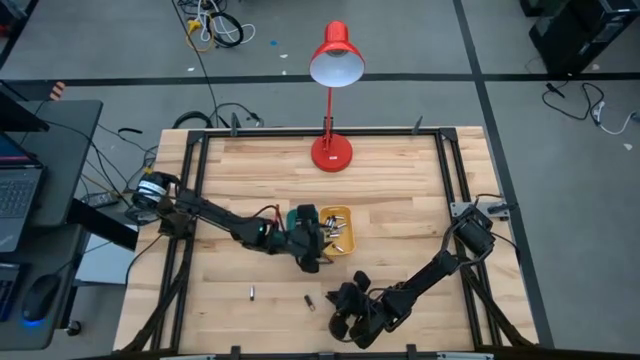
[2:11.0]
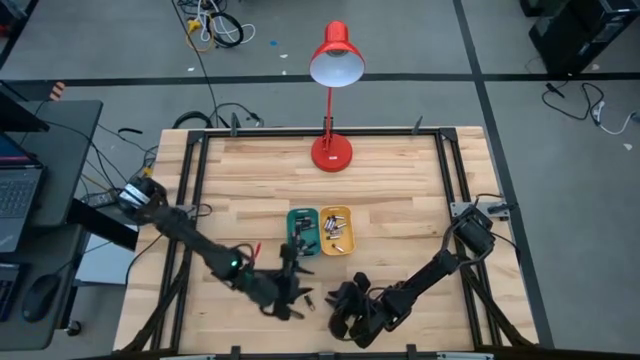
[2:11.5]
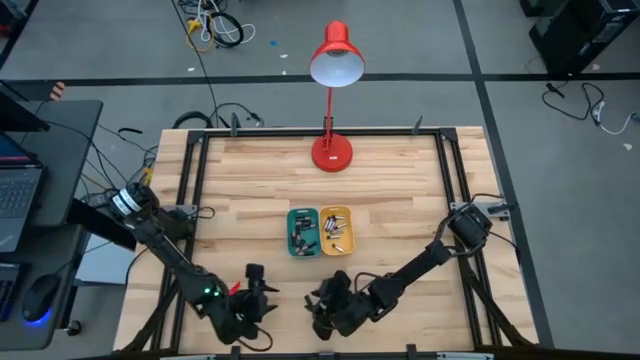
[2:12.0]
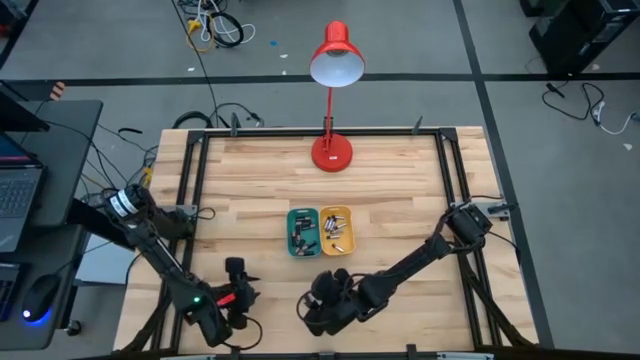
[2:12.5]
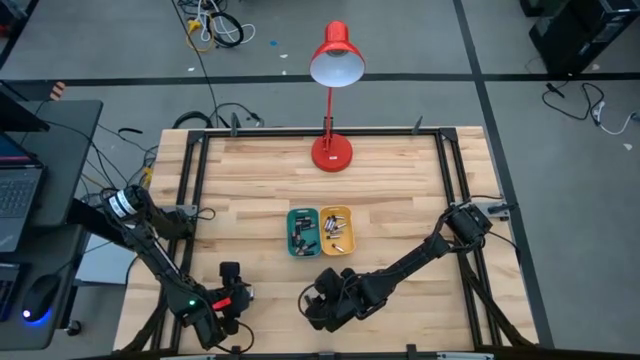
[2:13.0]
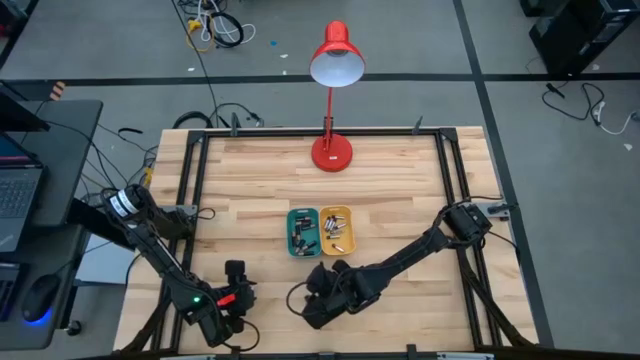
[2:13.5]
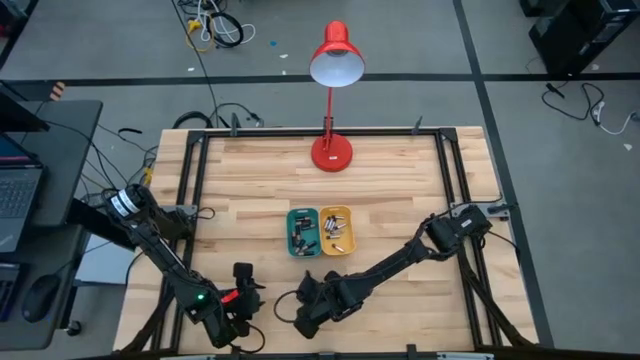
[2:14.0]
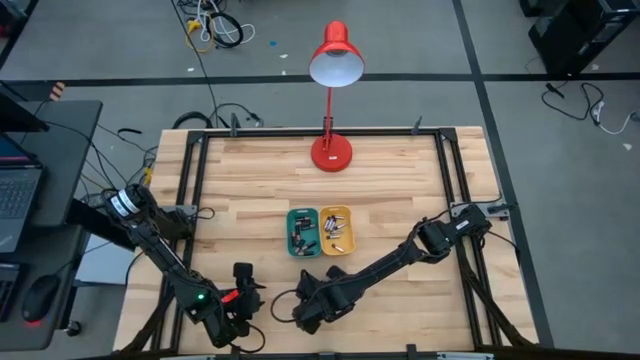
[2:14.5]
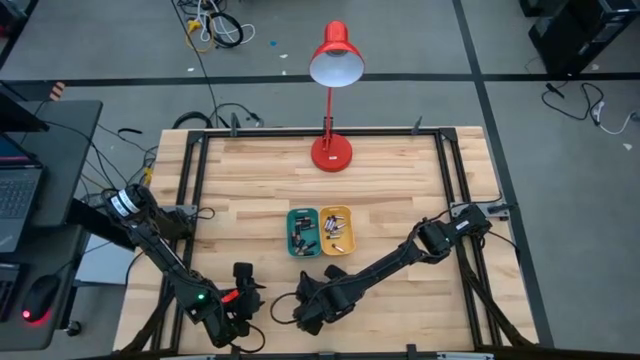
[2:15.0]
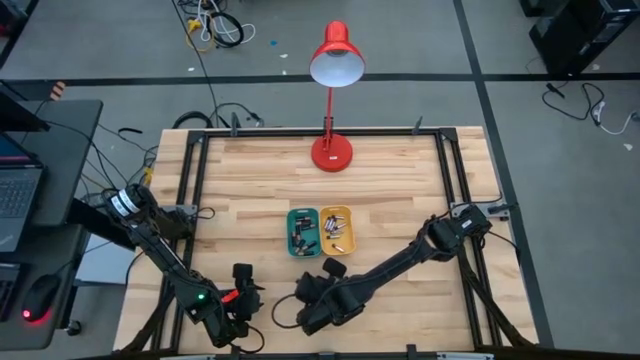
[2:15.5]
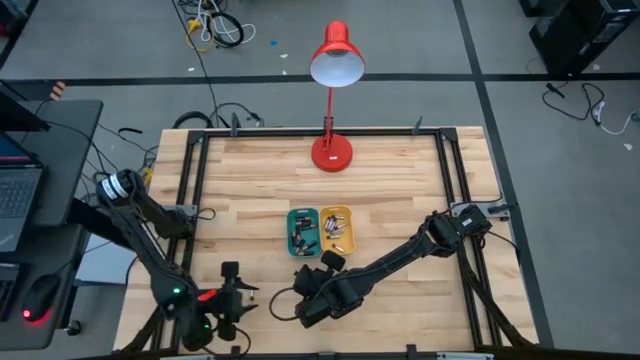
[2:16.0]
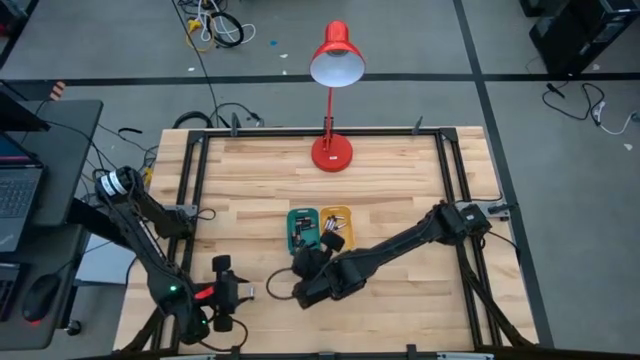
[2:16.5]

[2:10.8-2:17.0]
Task: Sort batteries
Put the black battery into the blue bin

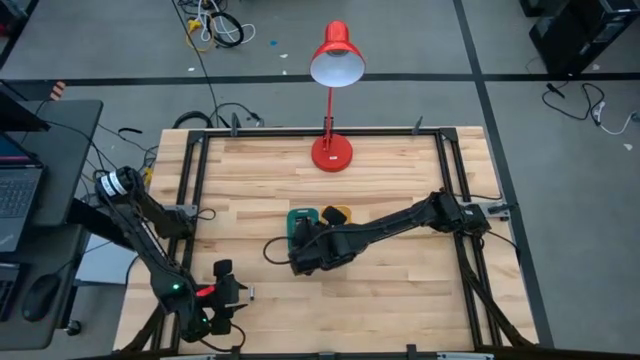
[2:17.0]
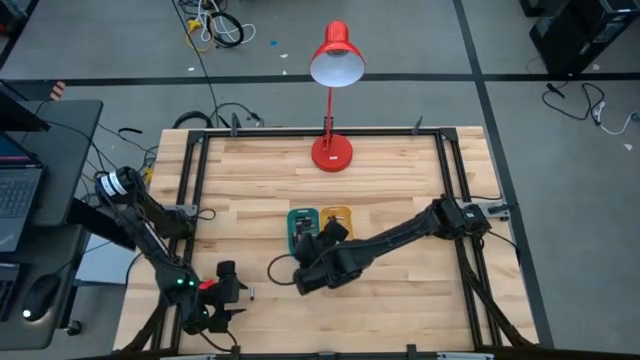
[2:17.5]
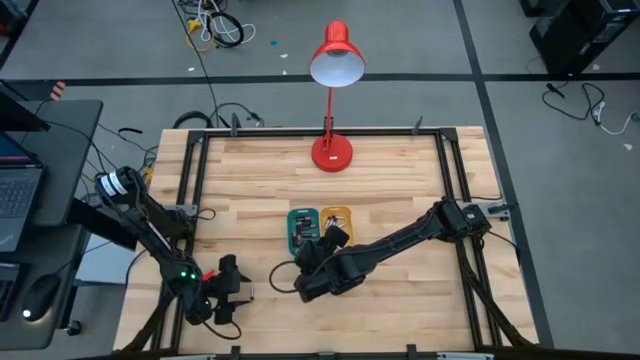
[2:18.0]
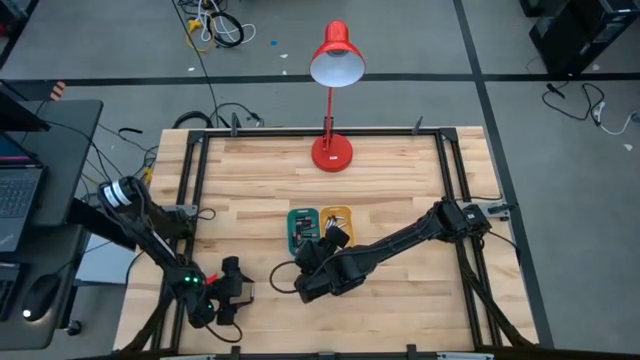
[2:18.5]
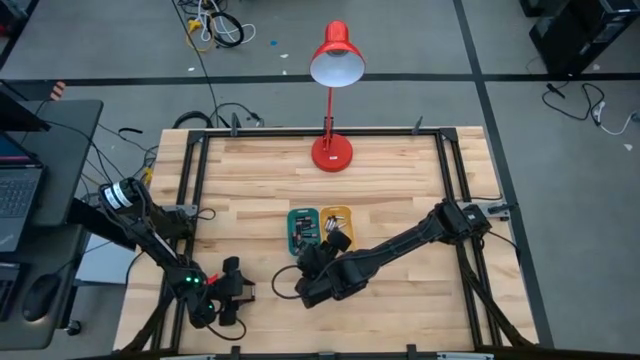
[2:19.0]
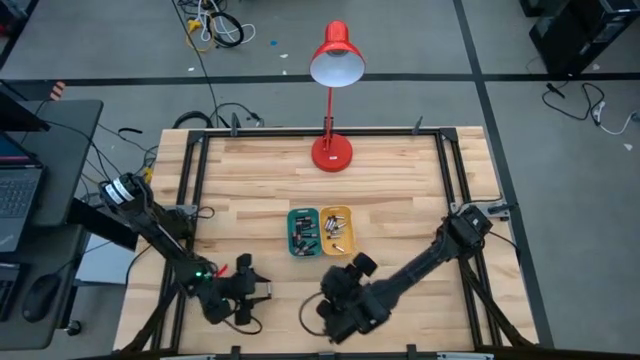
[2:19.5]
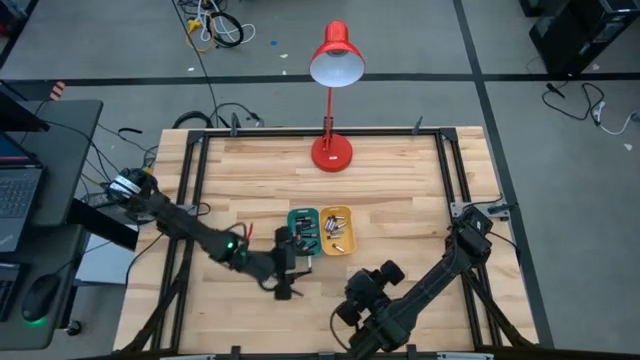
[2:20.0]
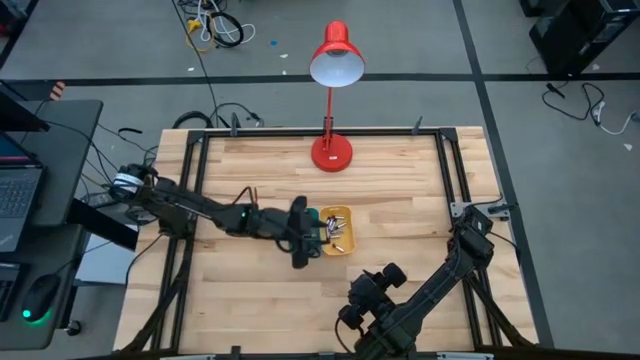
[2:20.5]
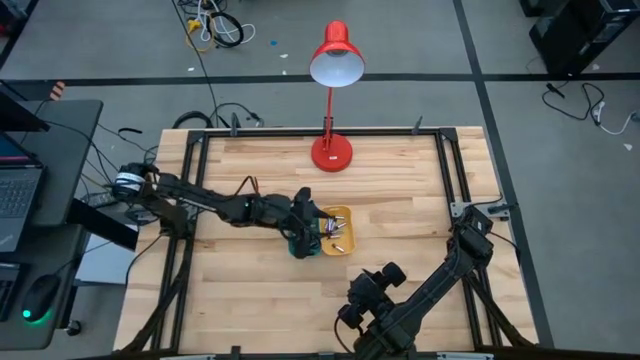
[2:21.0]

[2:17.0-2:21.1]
Put the white battery into the yellow bin

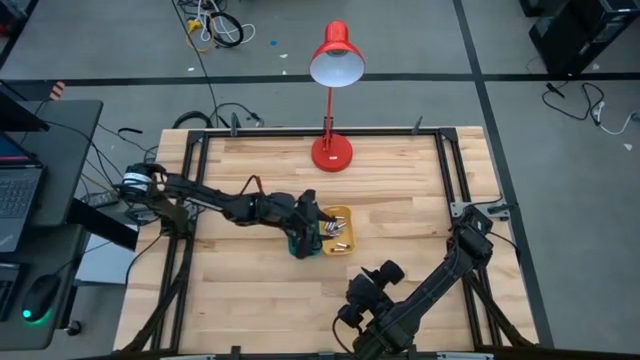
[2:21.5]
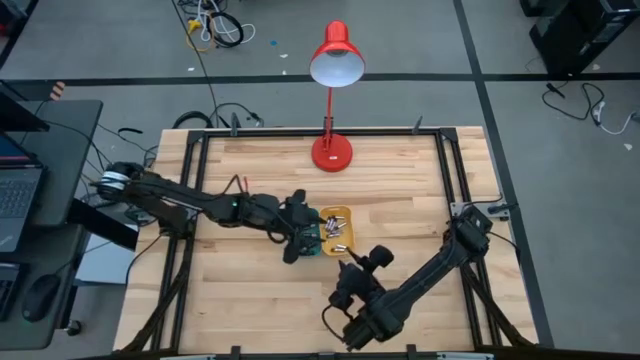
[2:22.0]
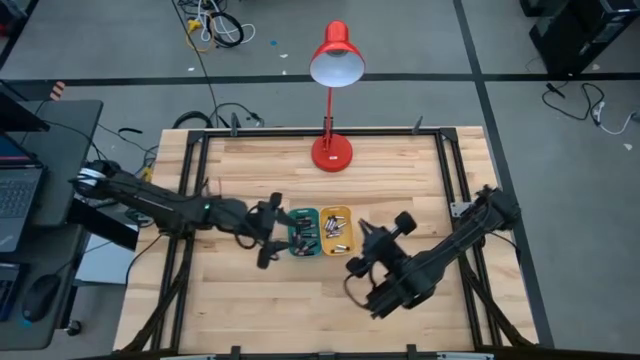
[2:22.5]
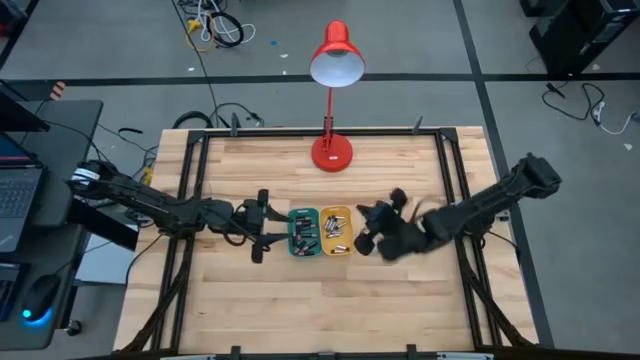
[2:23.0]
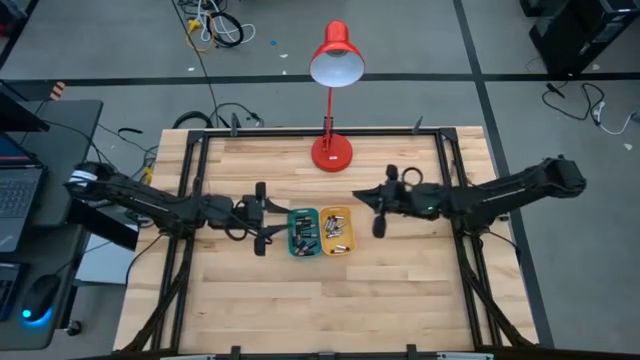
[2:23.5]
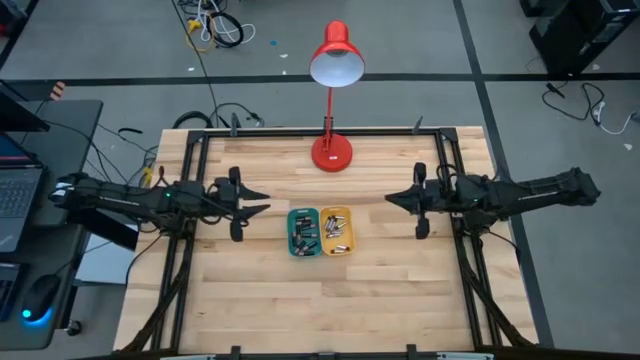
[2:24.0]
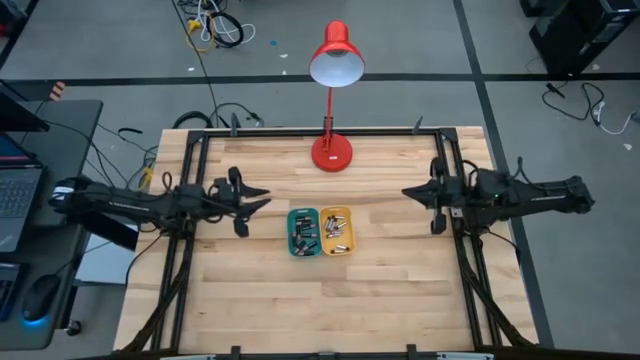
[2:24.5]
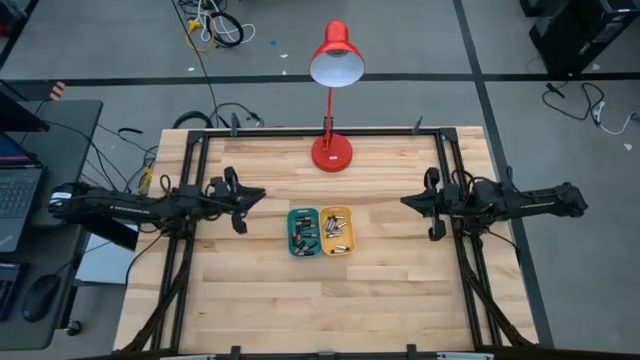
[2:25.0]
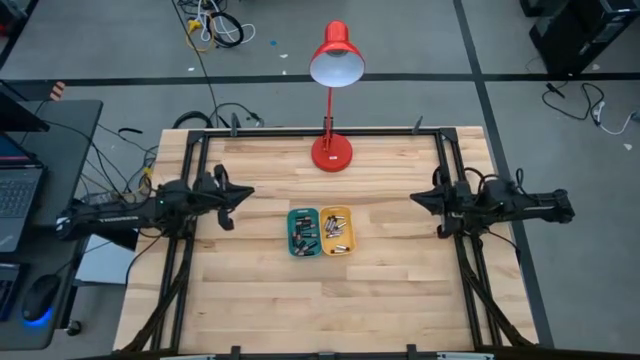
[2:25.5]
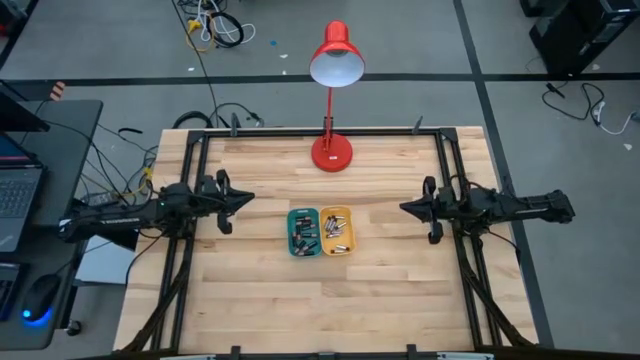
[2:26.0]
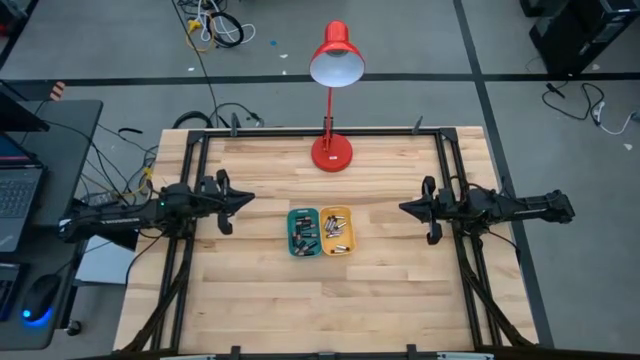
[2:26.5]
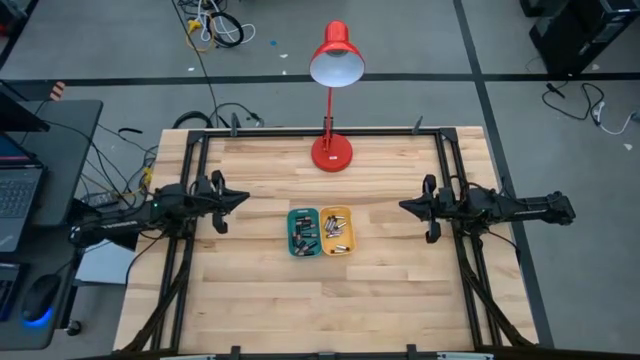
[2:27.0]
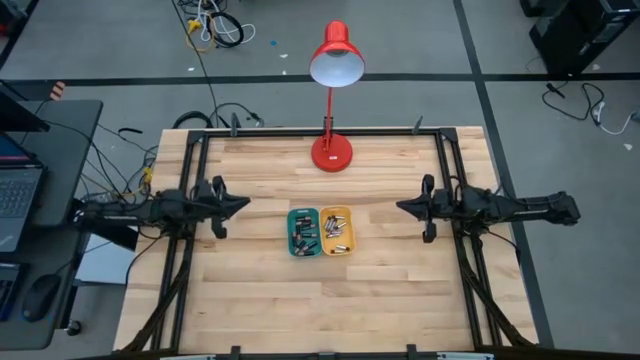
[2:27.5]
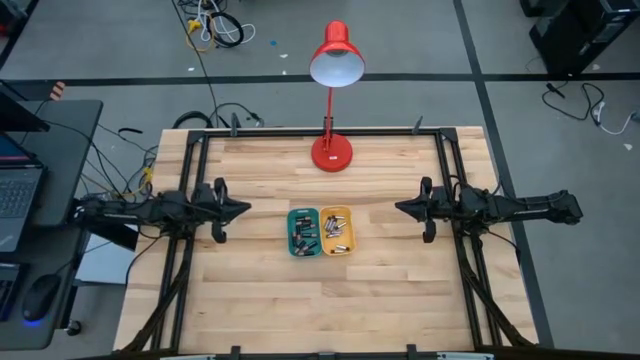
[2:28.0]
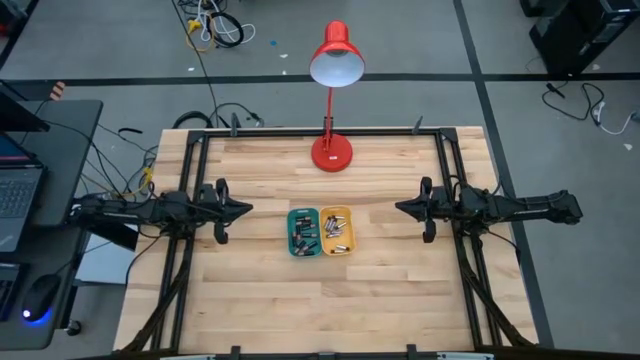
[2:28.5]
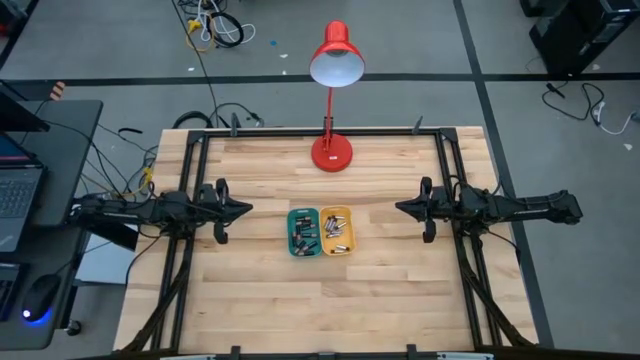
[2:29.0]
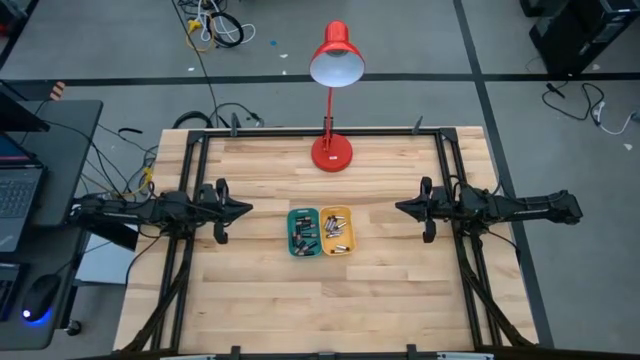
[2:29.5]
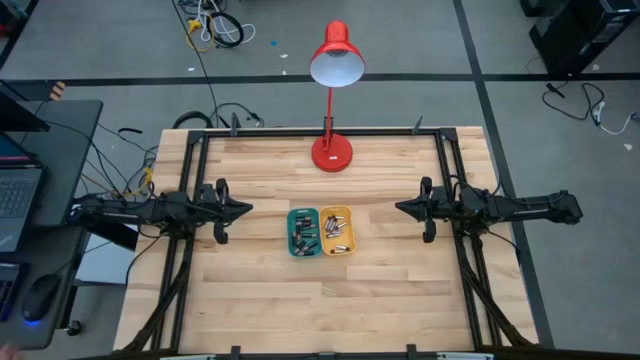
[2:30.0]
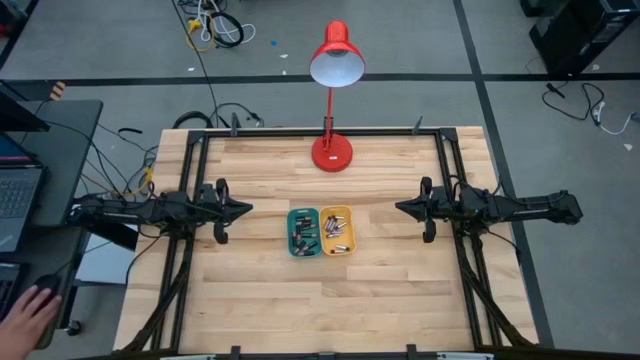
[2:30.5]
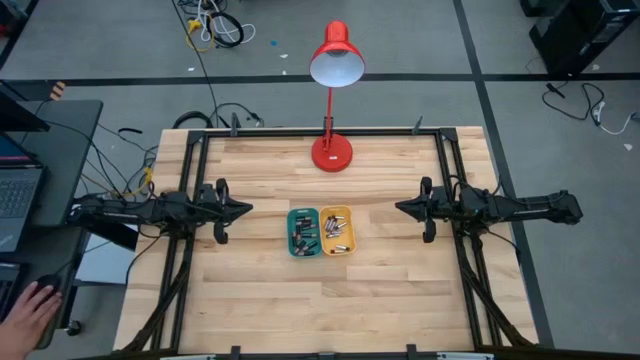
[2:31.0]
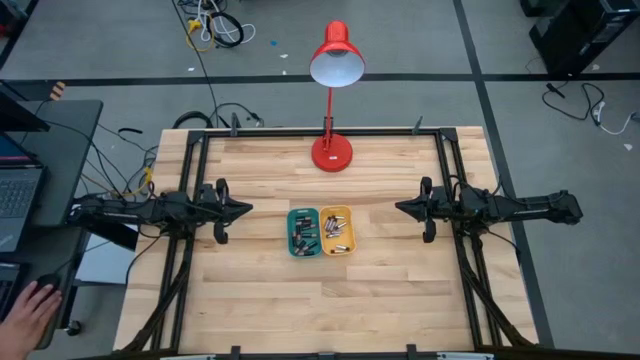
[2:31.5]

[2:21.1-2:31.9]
Return to Home Position
